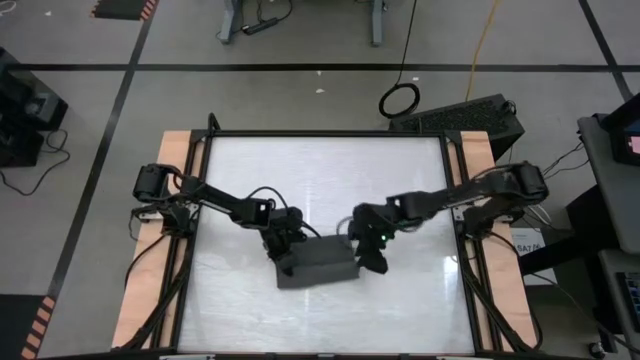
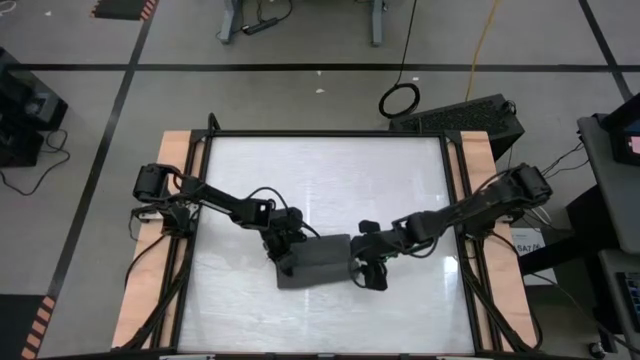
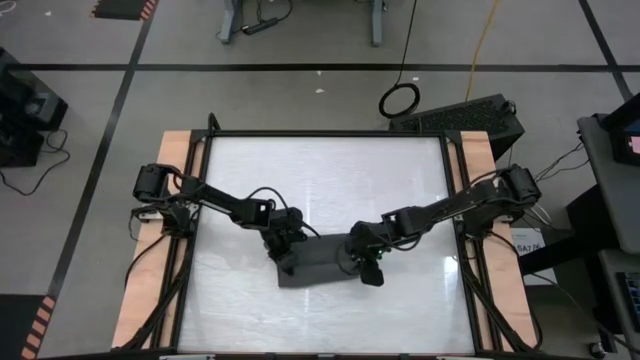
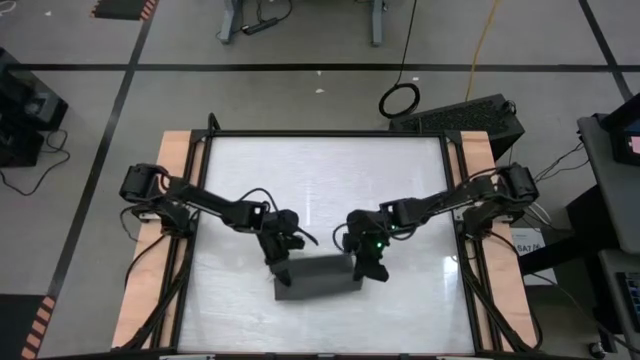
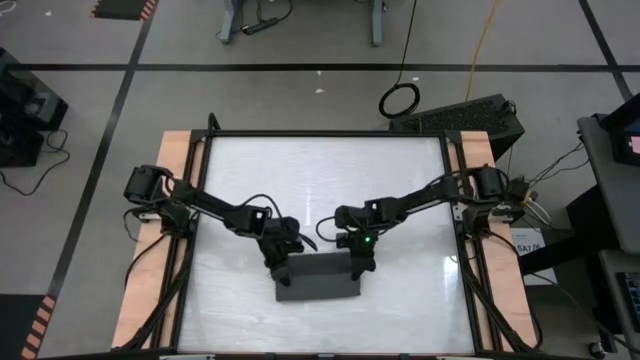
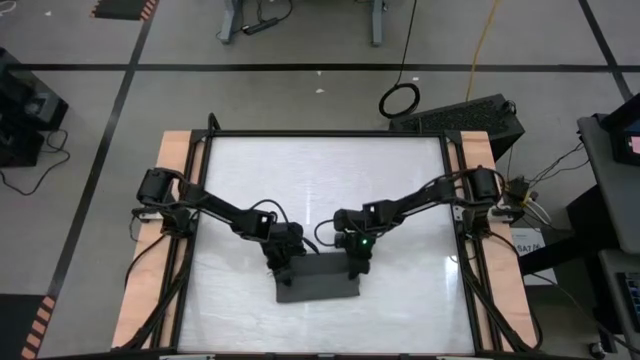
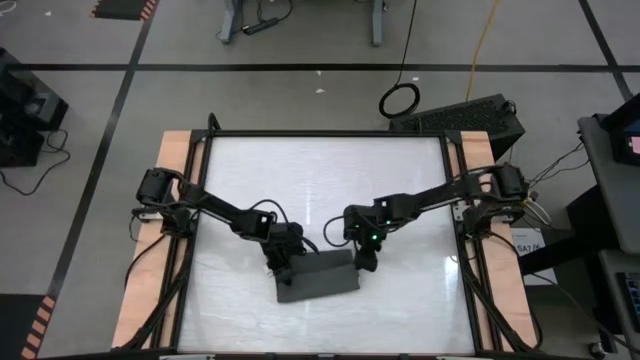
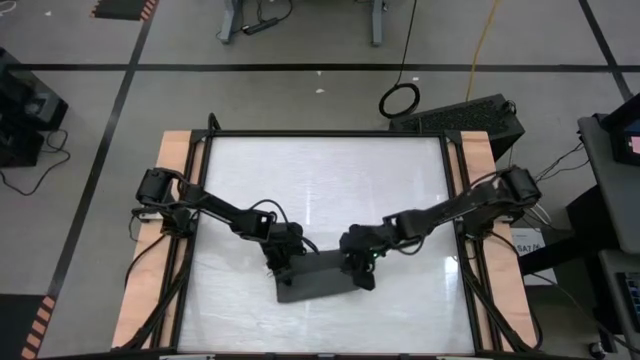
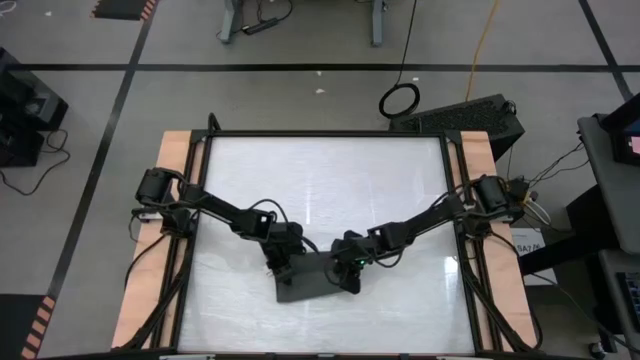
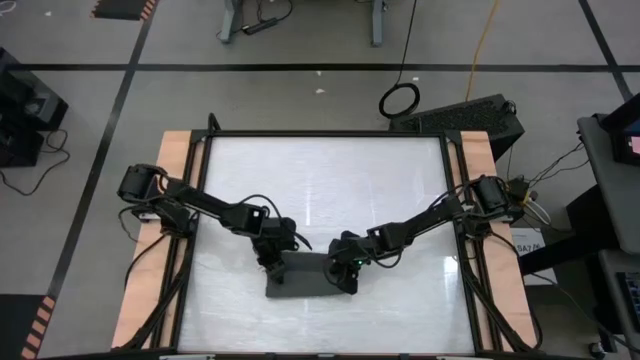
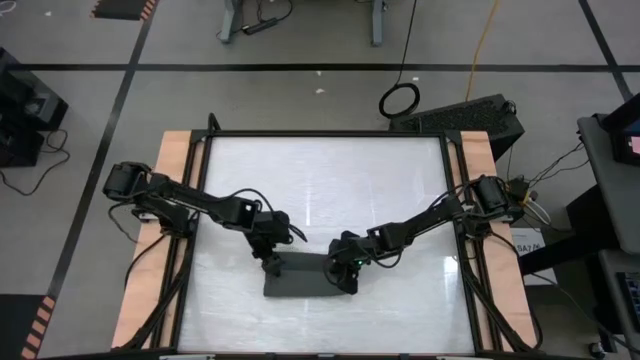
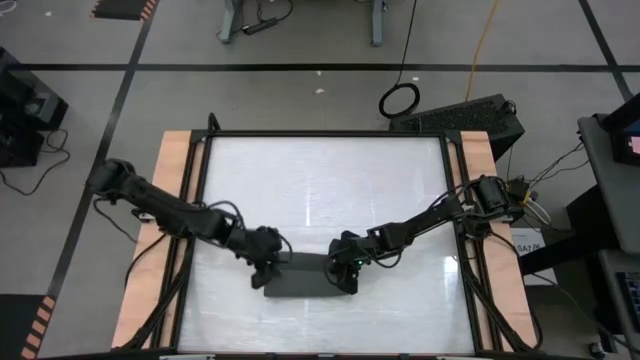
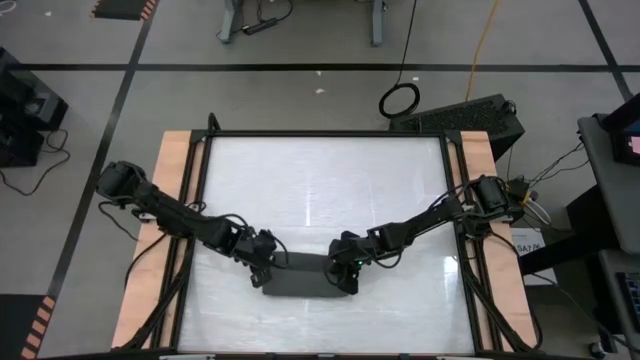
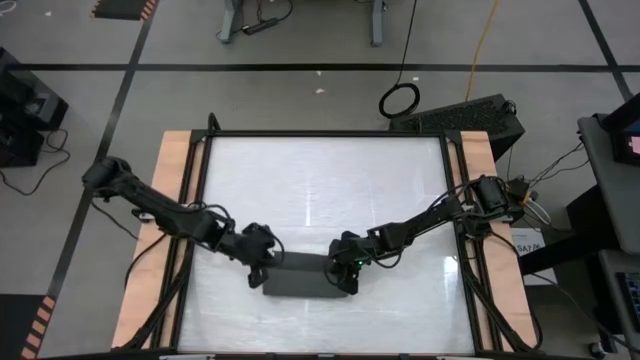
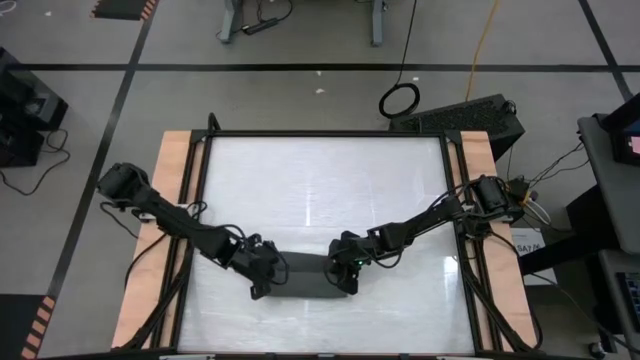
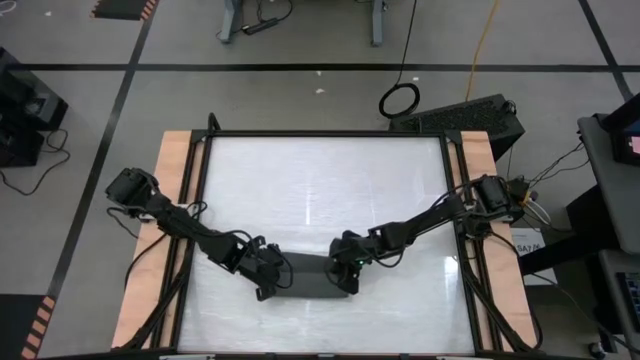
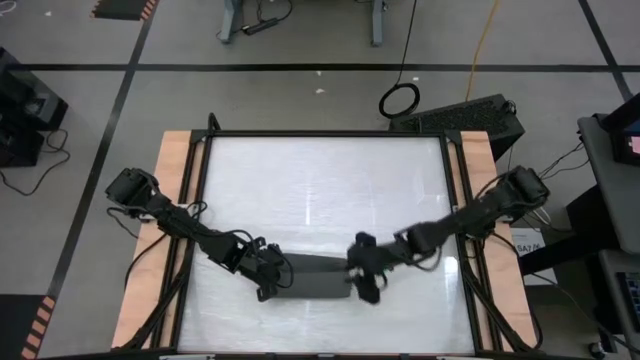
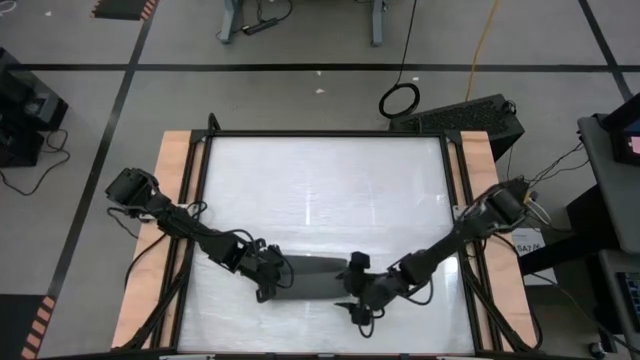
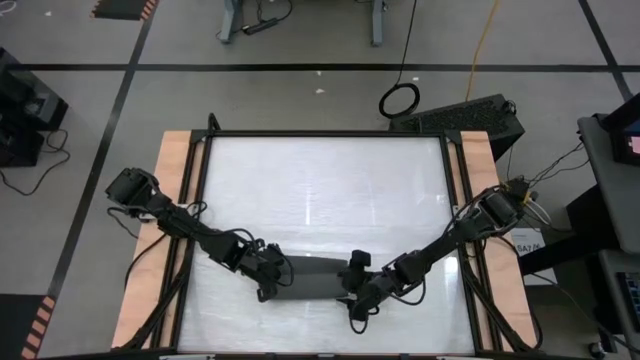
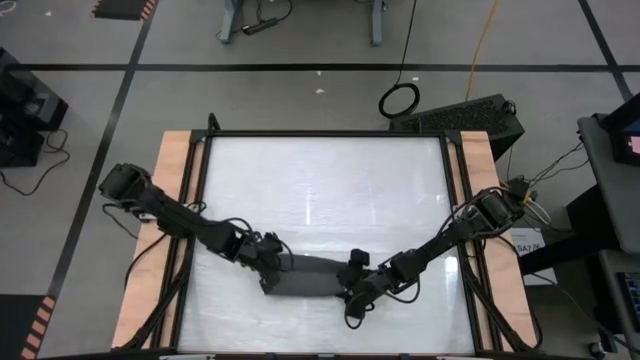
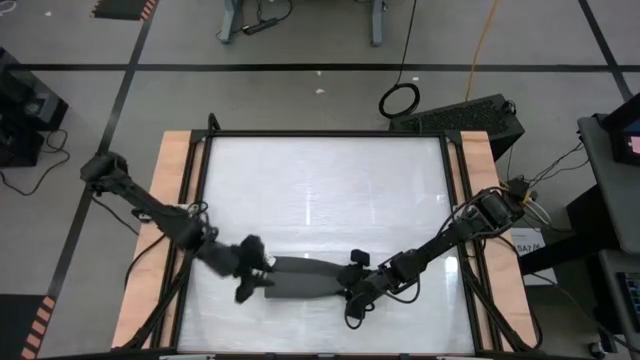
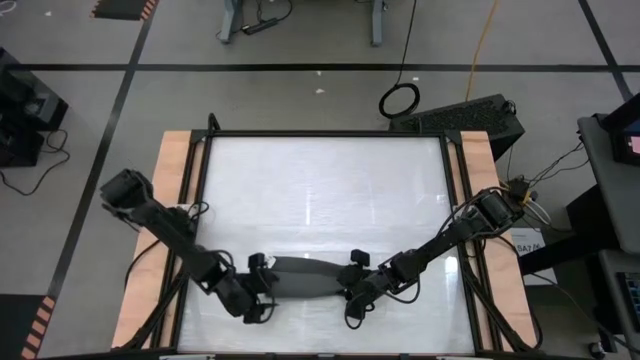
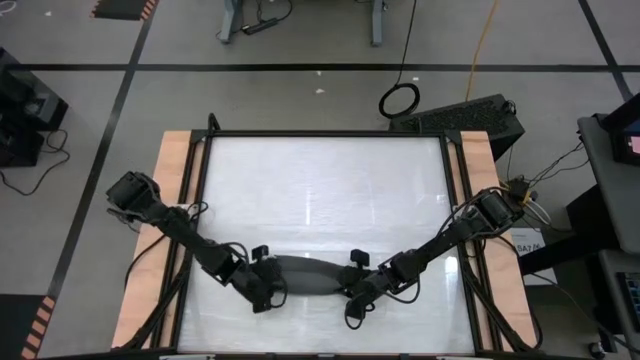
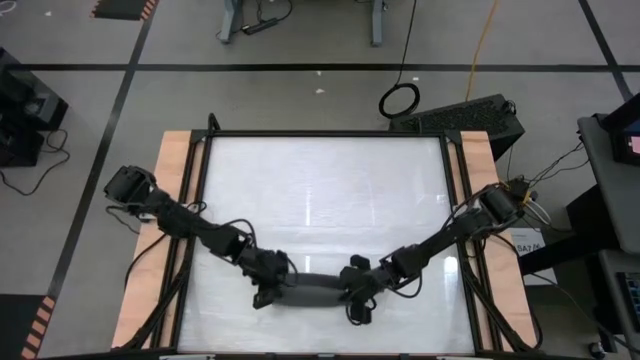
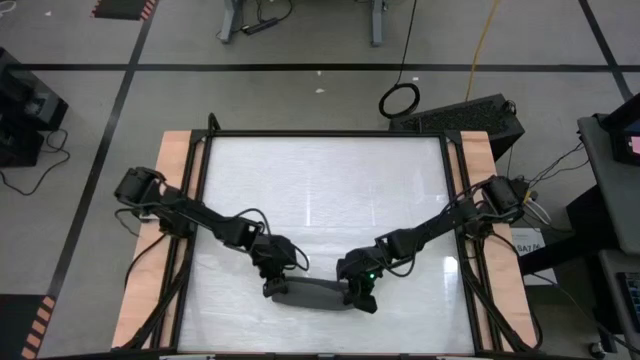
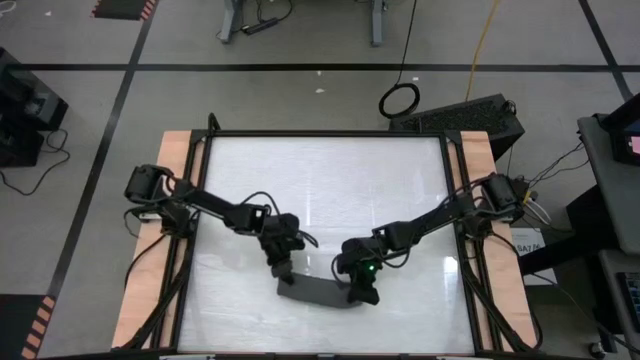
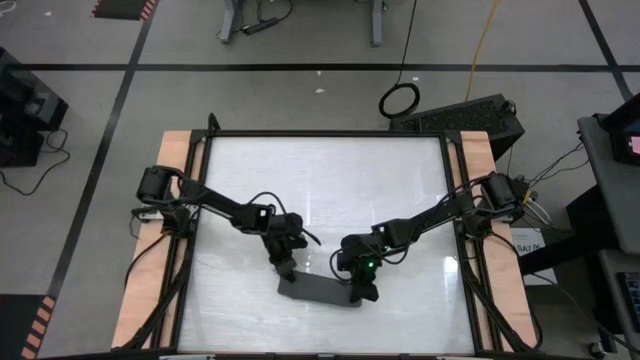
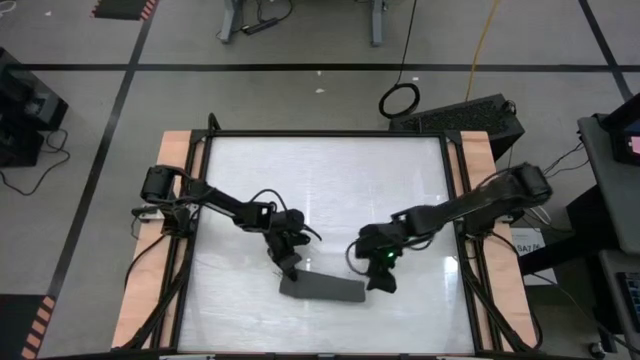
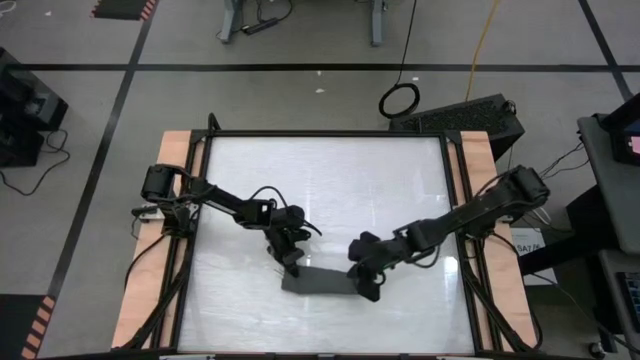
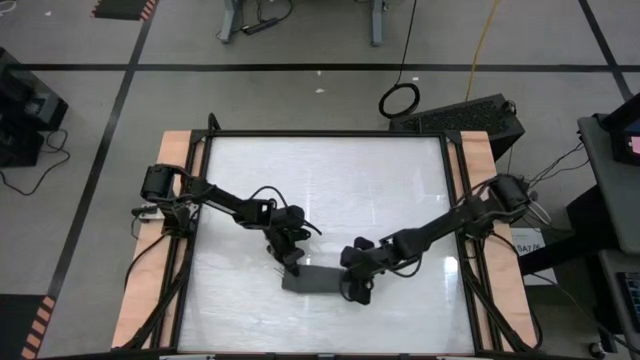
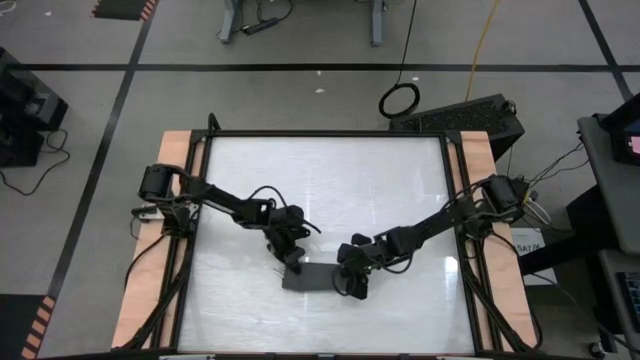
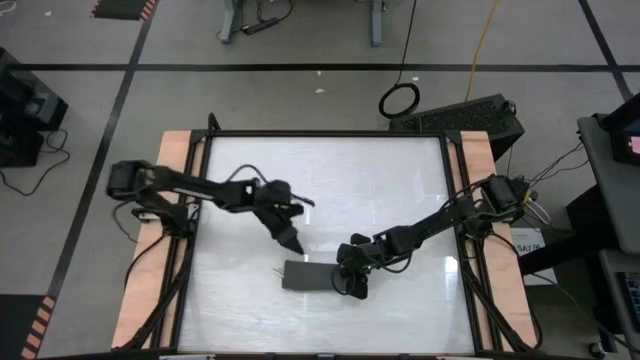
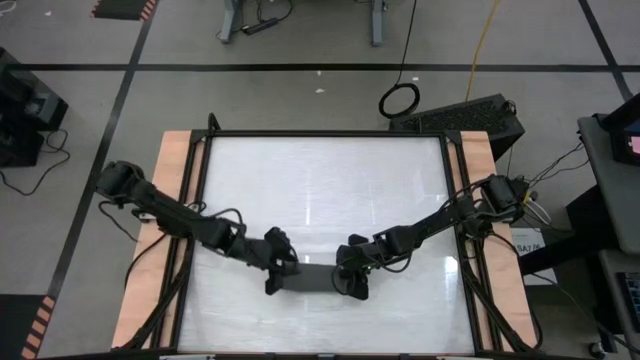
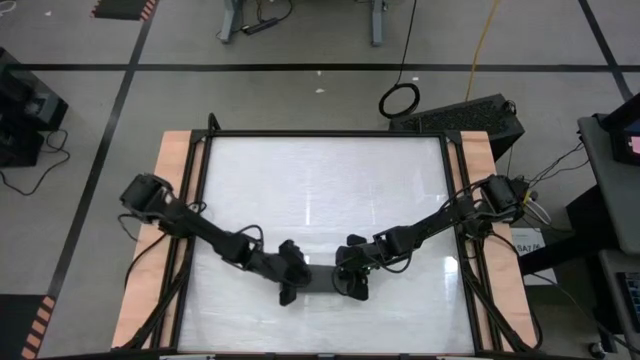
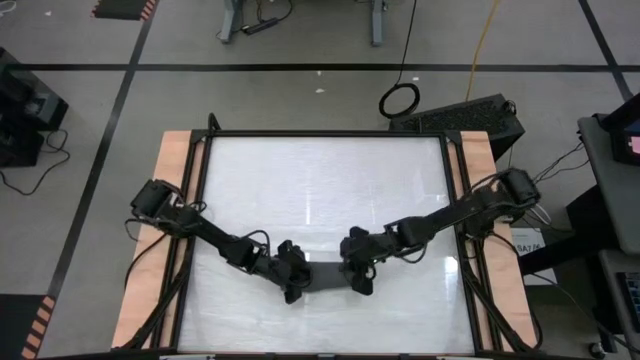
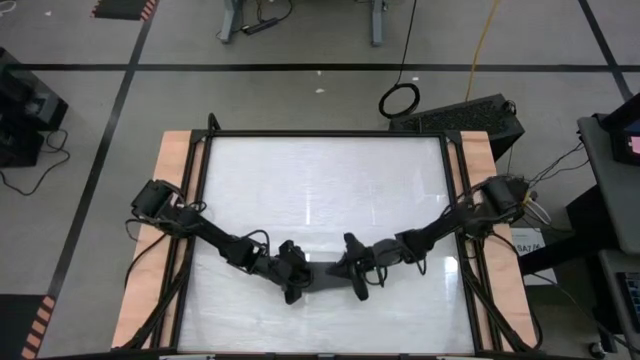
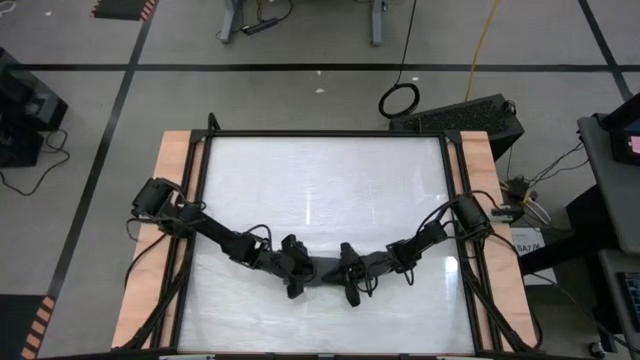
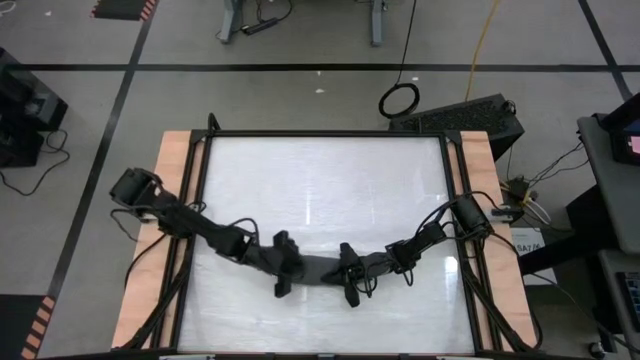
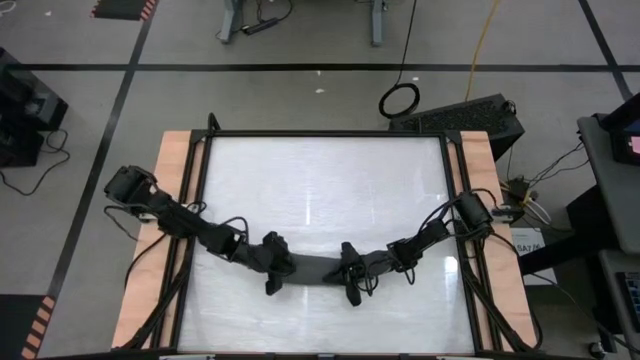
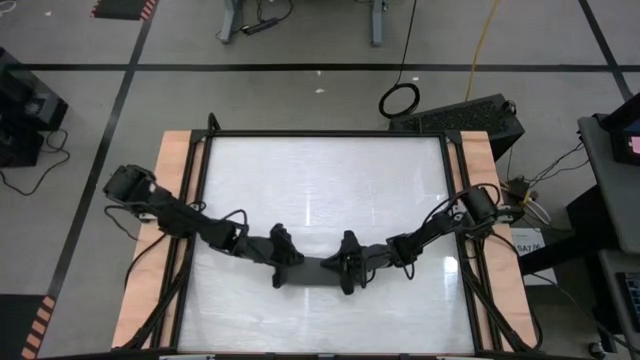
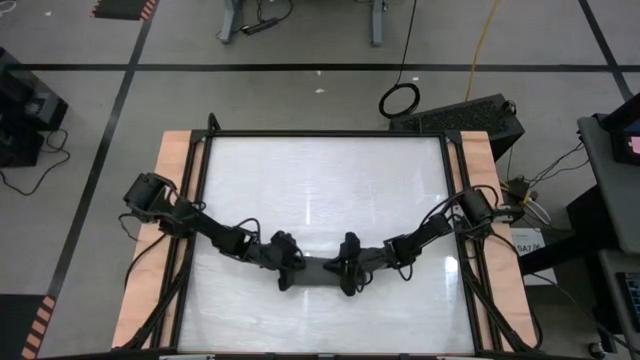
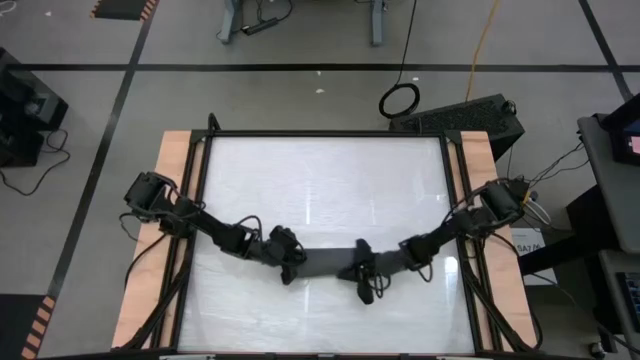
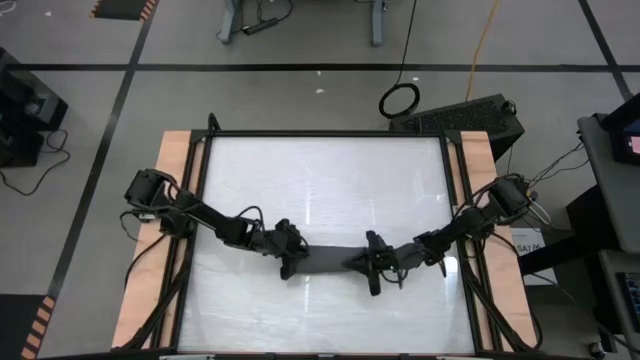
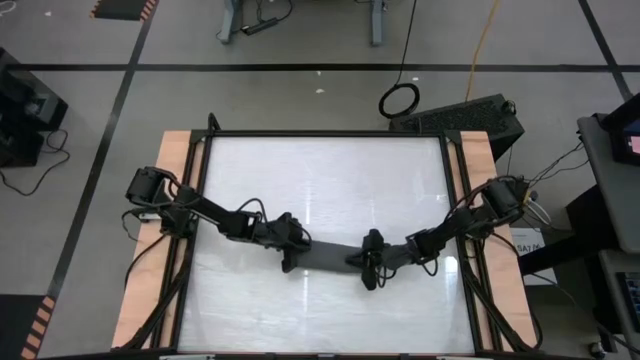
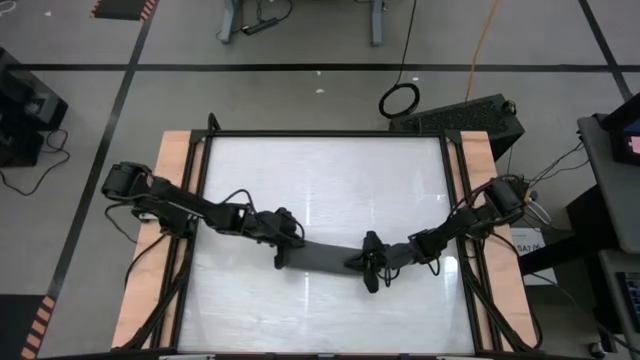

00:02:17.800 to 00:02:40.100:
Task: Roll towel
Roll the gray towel
